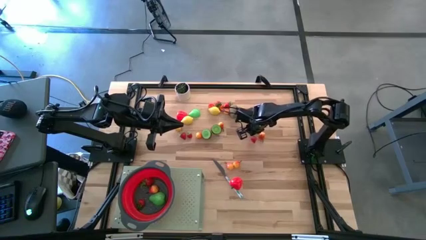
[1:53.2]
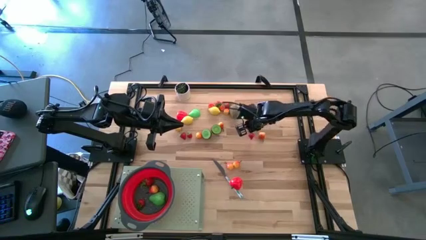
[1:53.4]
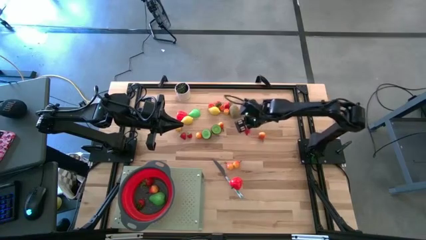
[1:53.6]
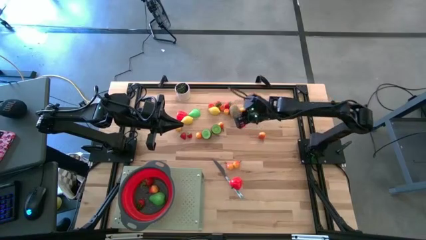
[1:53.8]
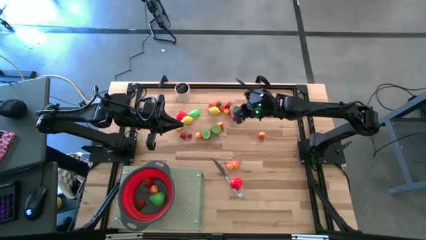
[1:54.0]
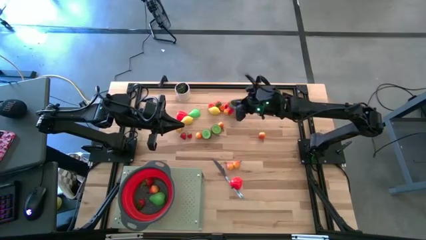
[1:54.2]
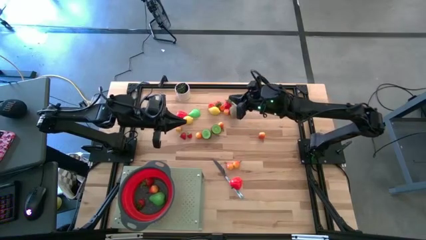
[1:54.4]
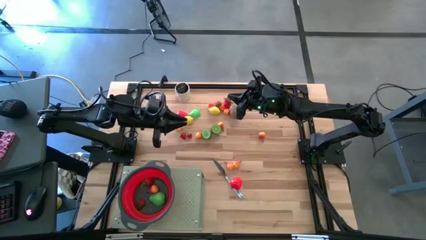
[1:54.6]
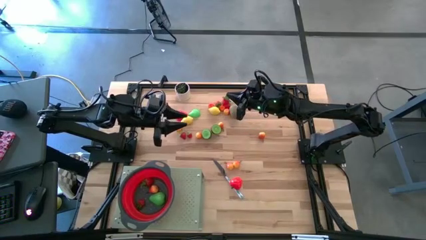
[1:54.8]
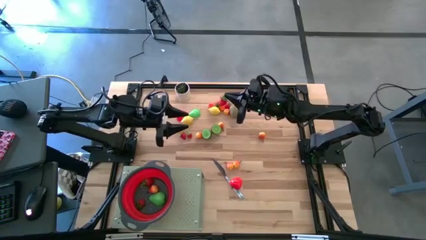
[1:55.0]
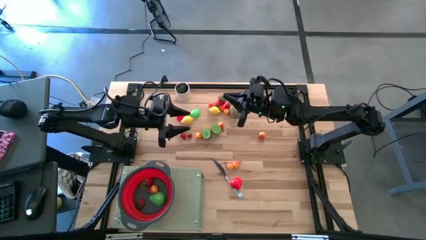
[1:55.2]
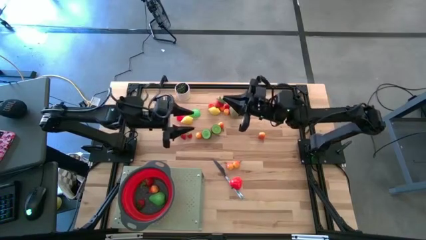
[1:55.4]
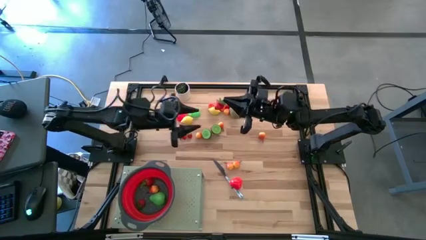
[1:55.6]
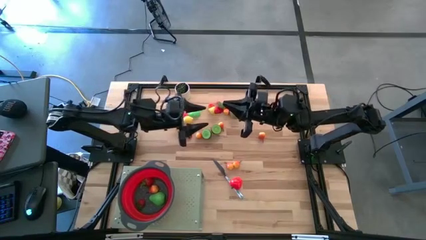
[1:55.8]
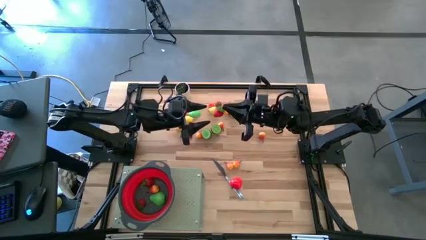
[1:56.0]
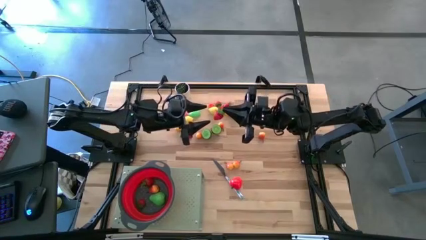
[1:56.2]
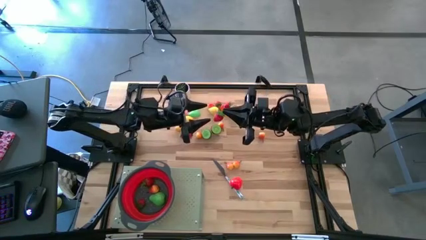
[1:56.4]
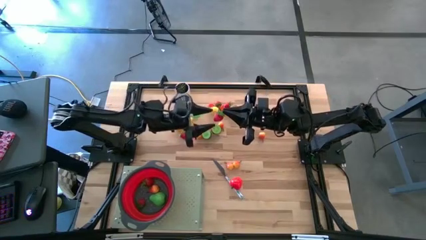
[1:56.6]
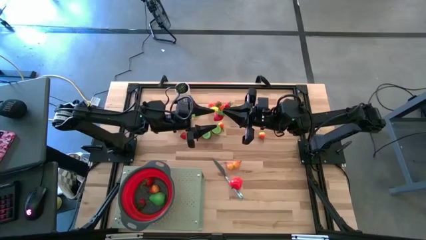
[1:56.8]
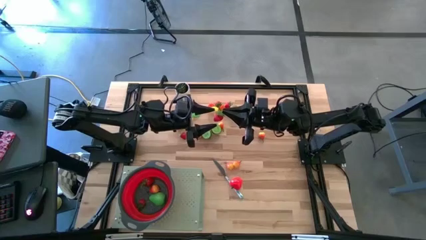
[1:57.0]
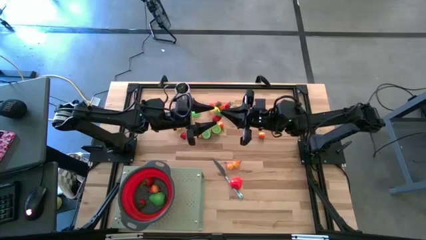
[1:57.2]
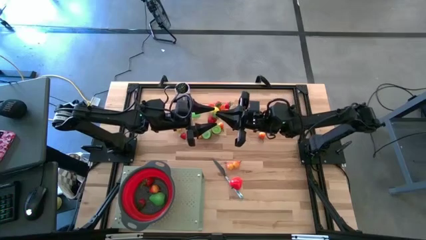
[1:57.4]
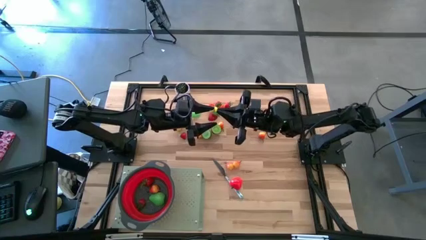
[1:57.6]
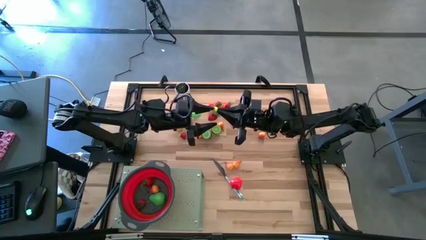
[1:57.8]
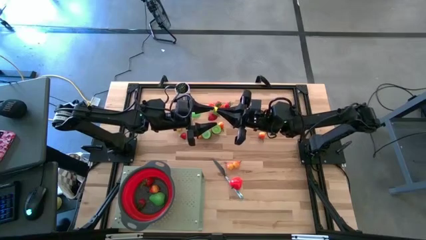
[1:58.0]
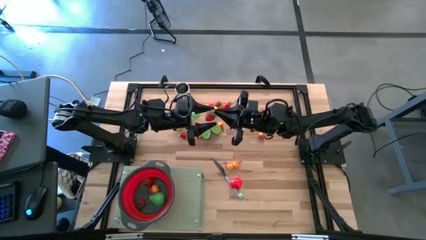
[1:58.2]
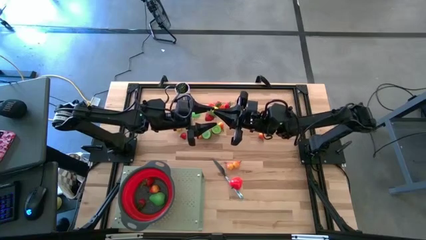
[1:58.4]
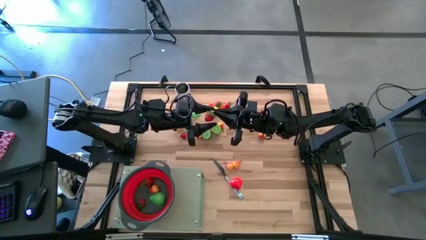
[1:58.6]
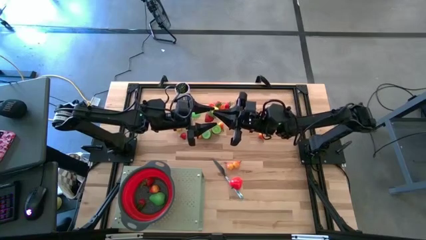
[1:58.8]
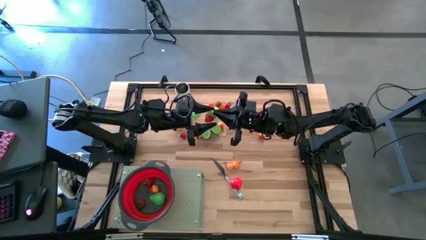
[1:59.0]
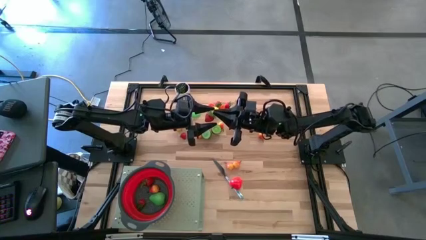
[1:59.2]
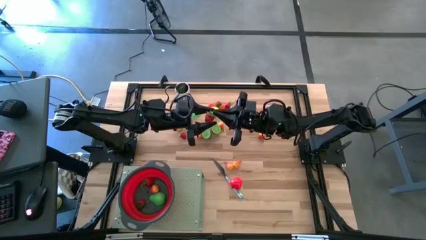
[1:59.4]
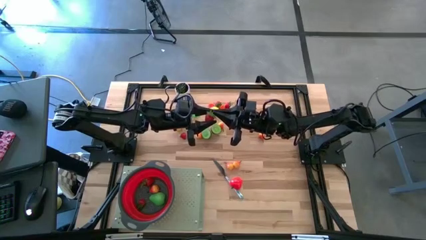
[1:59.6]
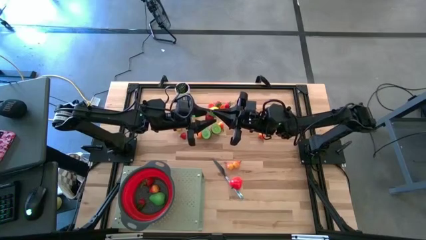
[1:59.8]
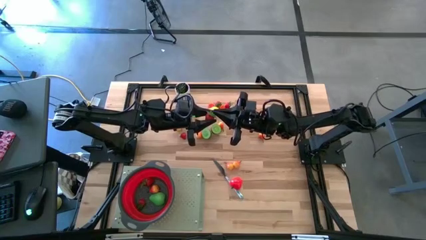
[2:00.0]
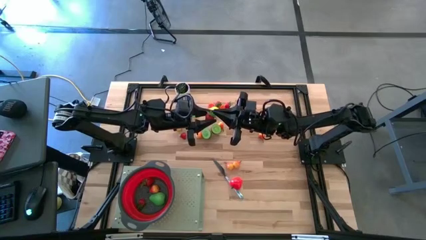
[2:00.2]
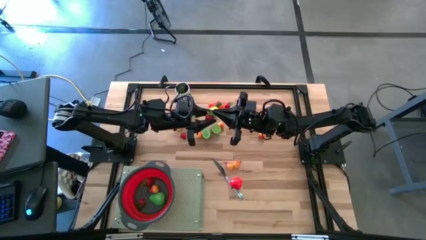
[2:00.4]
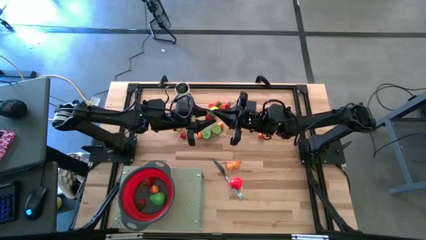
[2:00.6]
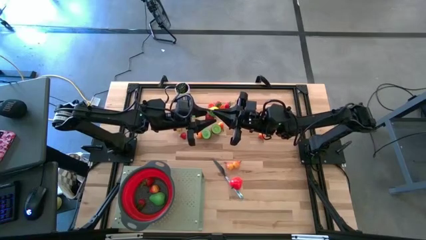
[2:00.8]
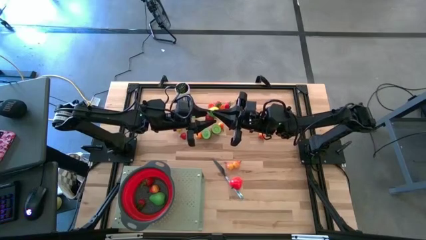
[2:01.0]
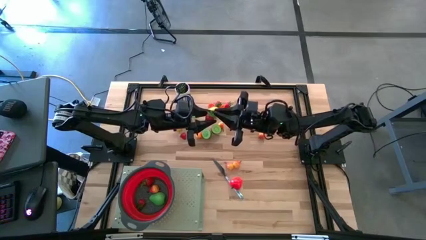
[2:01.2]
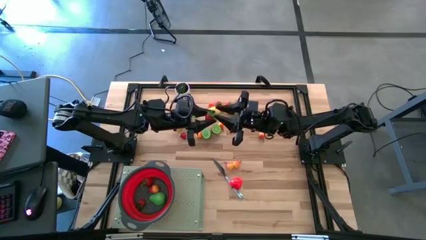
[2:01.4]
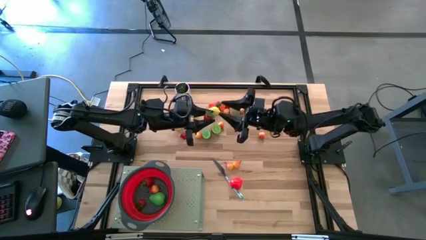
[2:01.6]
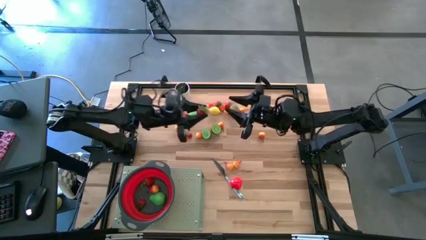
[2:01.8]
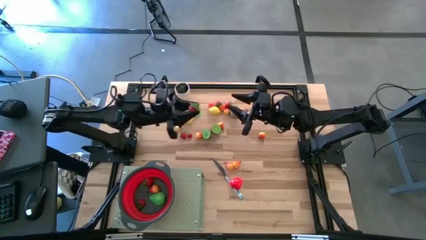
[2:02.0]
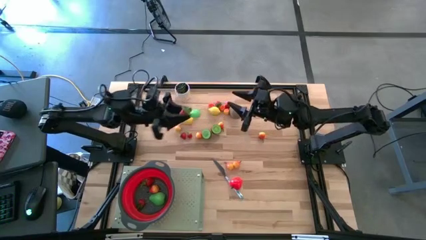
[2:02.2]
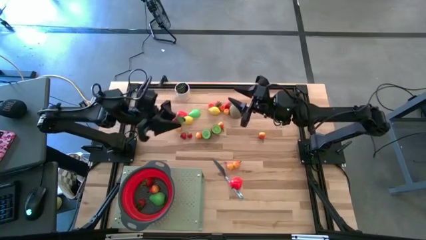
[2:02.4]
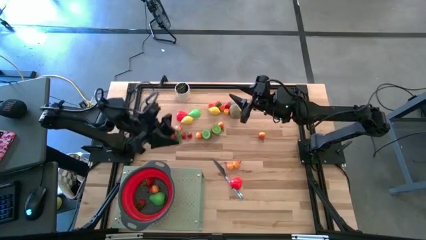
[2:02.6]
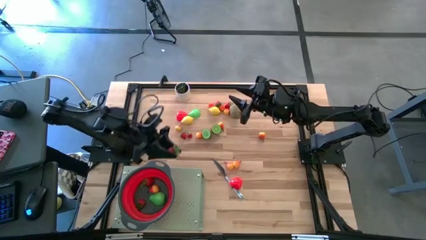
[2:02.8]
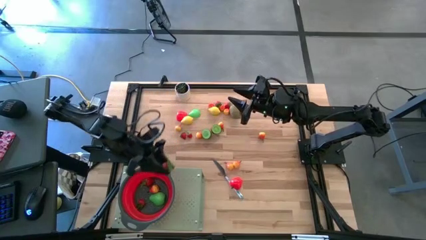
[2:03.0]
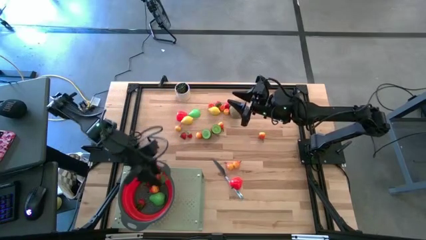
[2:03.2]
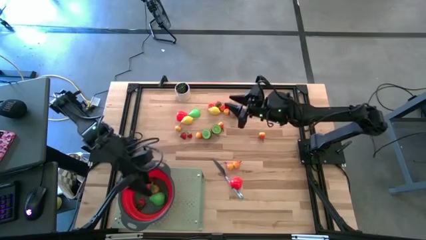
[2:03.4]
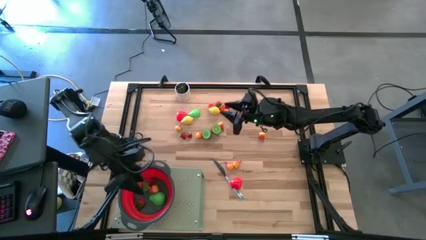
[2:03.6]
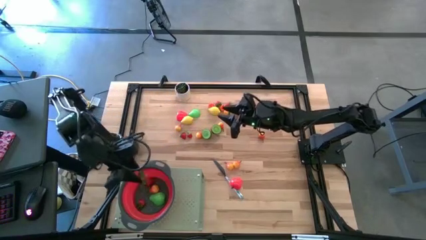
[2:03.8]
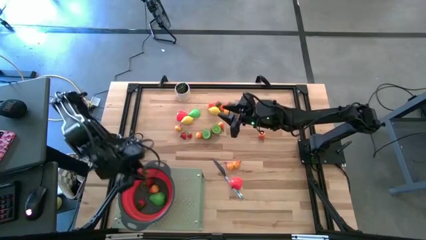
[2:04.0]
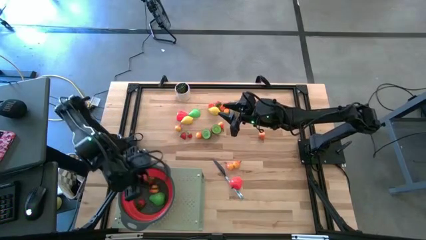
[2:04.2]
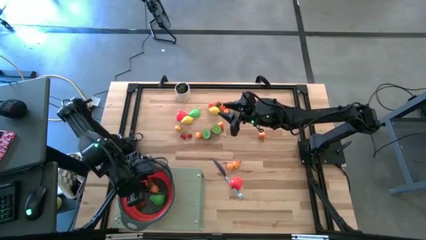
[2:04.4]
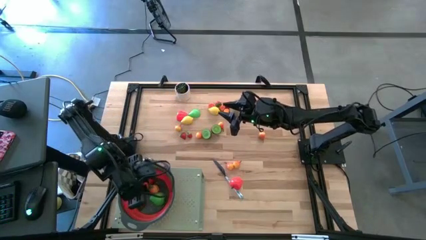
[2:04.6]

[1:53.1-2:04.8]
Task: Pick & Place Fruit
Put the strawberry into the red strainer bowl on the shelf

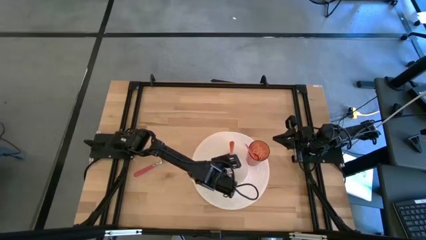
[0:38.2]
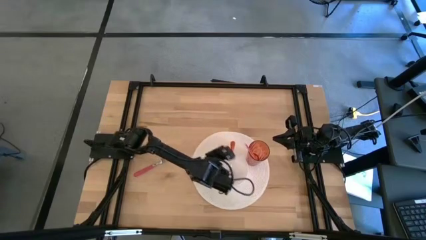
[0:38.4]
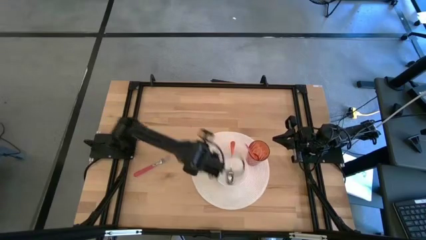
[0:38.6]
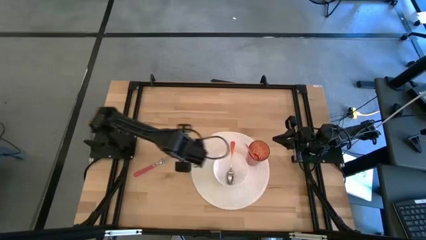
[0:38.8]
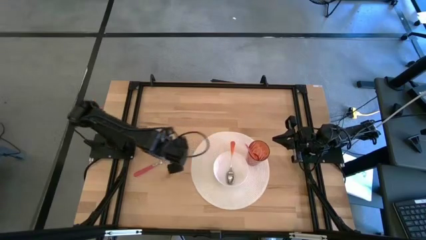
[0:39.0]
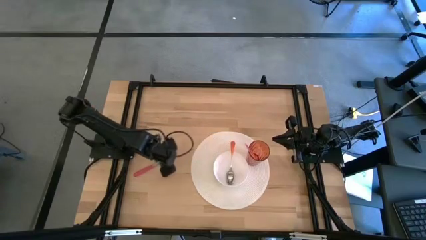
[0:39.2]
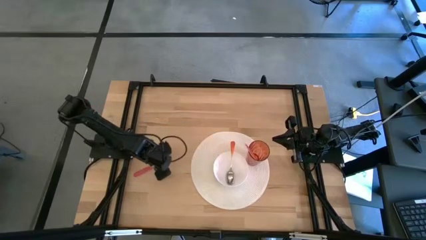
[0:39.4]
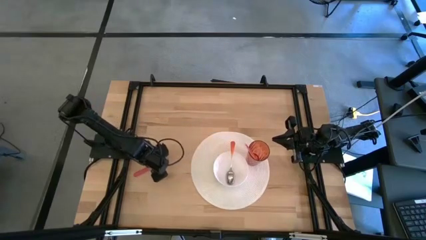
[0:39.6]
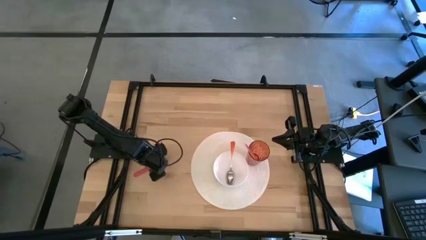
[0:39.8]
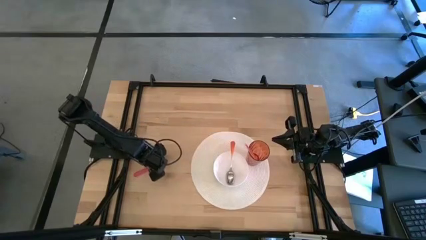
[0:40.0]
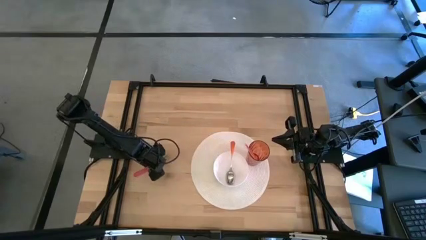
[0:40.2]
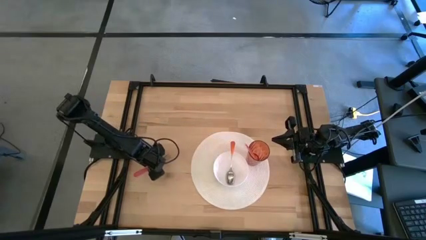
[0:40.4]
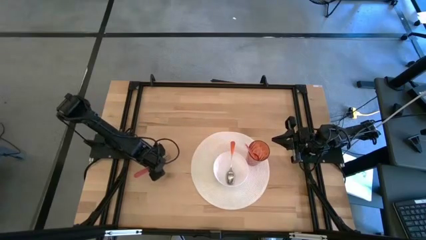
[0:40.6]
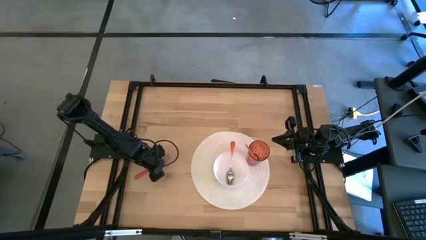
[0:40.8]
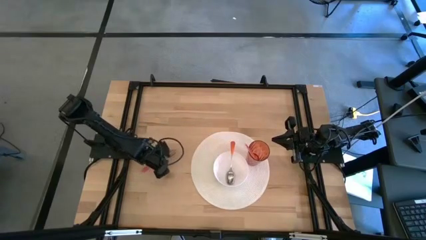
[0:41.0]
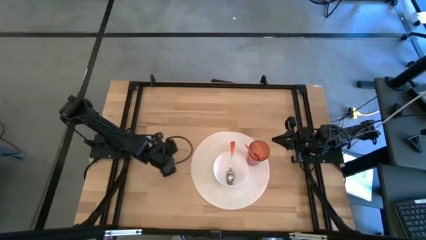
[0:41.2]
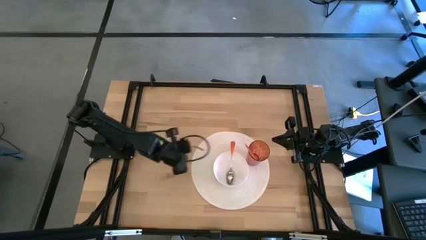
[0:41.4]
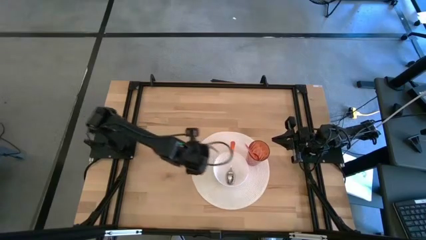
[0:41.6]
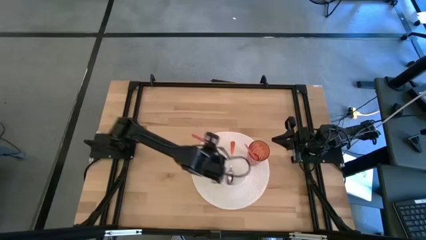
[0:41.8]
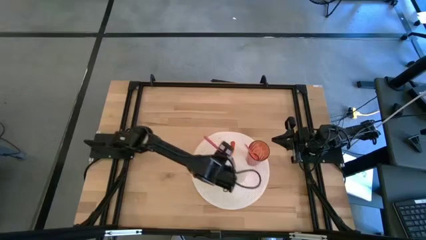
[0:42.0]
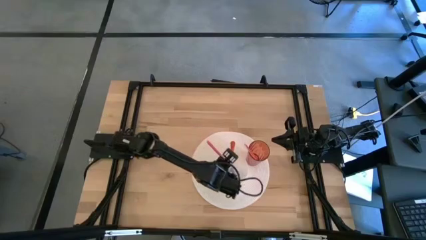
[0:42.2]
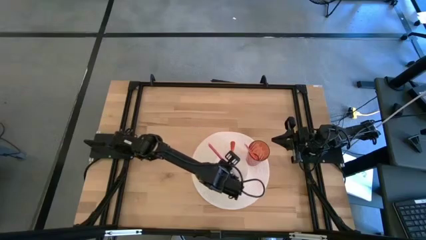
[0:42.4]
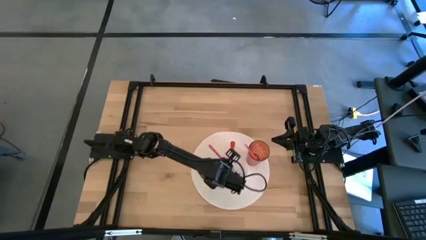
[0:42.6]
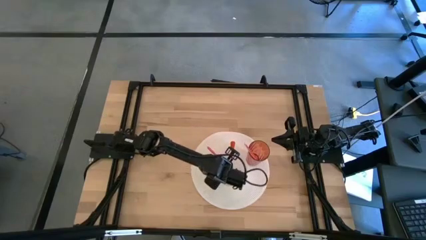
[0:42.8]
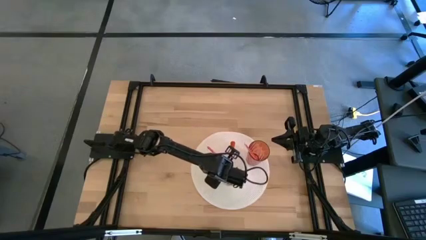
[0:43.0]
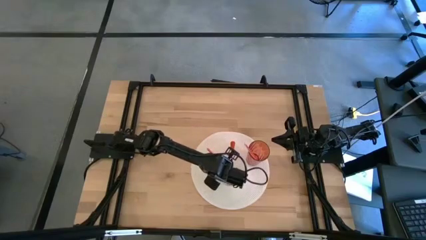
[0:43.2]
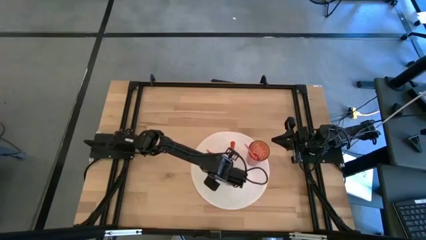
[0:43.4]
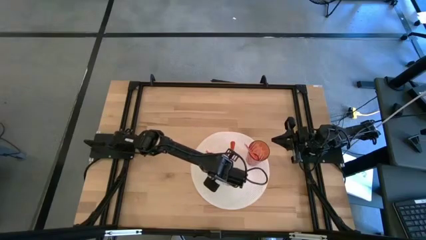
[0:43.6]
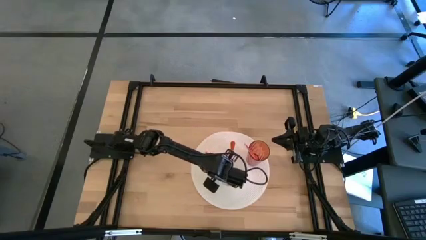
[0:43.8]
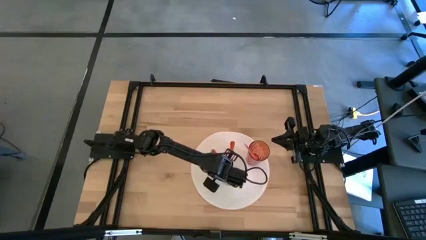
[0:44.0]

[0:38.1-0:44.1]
Task: Pick & Place Utensil
Put the pink fork into the white bowl
